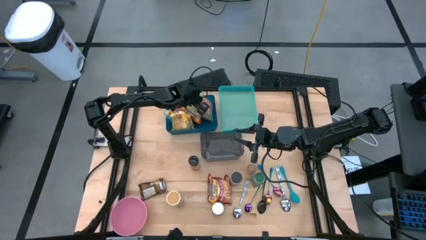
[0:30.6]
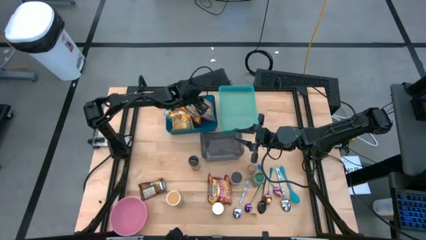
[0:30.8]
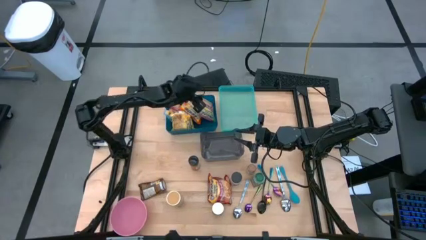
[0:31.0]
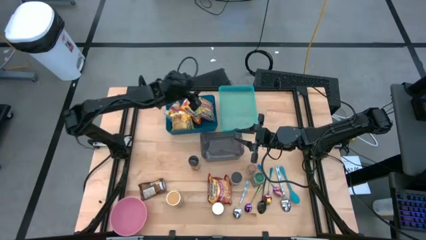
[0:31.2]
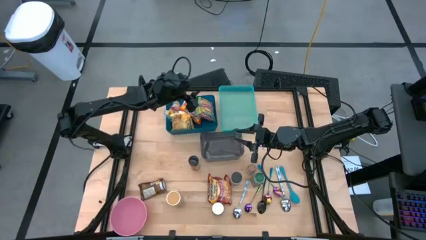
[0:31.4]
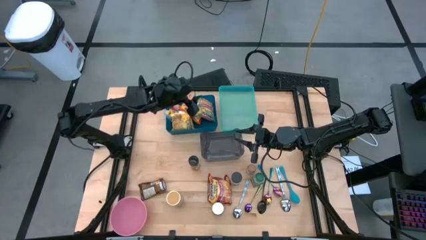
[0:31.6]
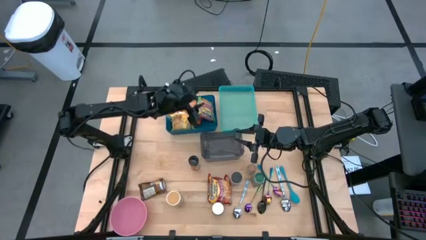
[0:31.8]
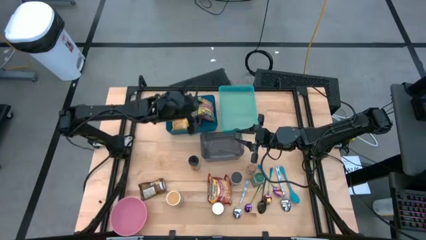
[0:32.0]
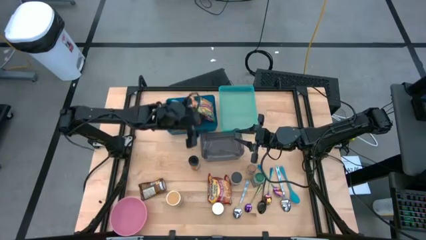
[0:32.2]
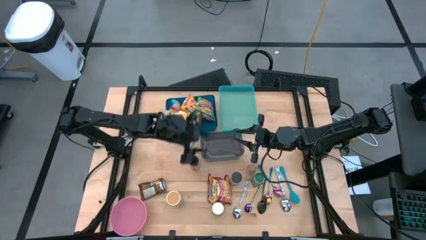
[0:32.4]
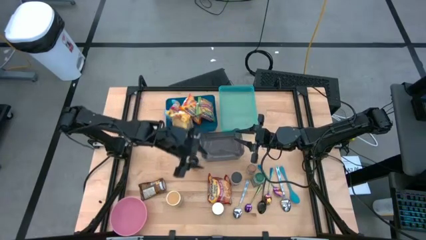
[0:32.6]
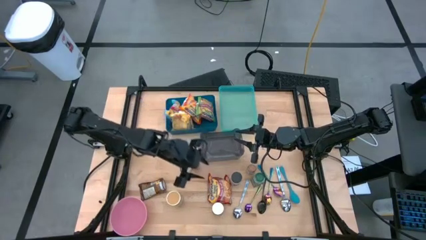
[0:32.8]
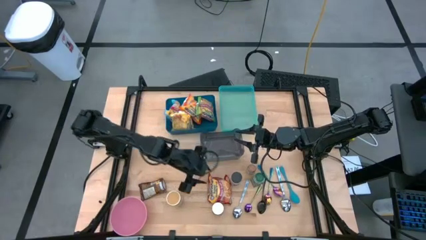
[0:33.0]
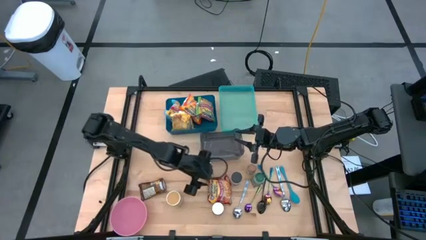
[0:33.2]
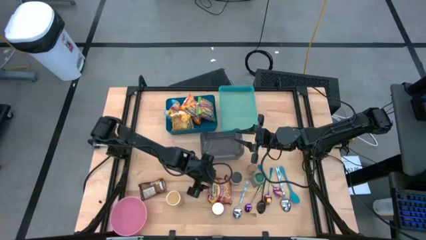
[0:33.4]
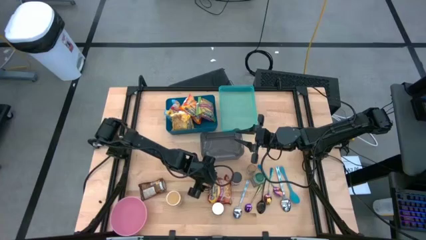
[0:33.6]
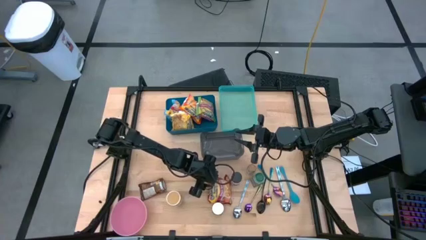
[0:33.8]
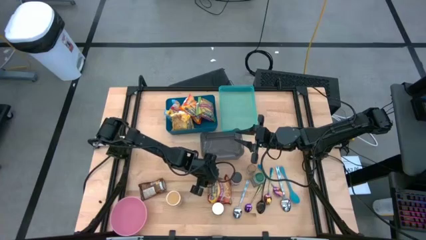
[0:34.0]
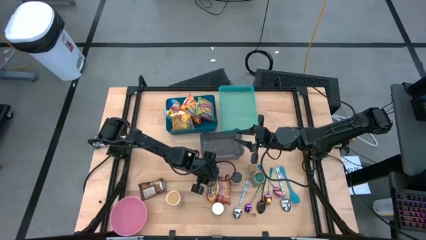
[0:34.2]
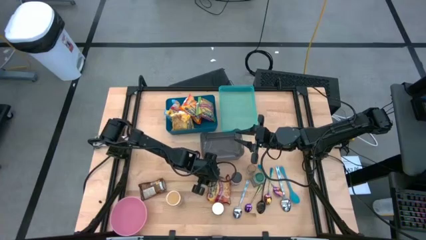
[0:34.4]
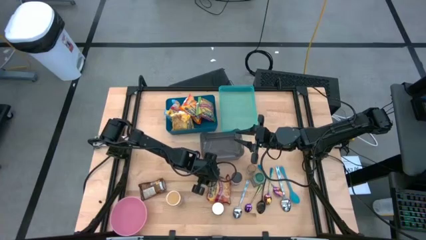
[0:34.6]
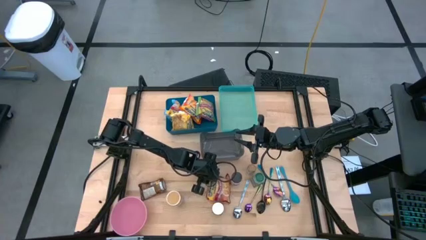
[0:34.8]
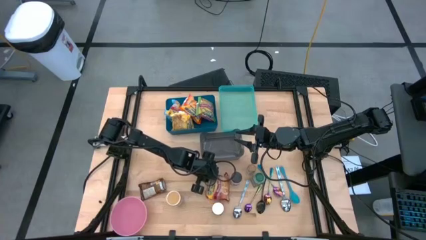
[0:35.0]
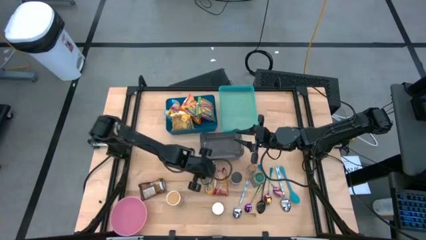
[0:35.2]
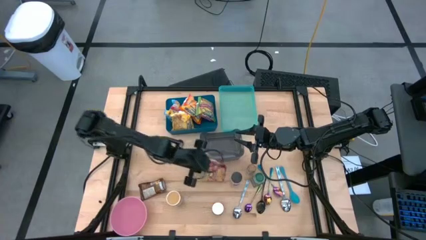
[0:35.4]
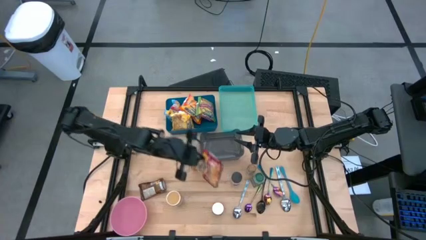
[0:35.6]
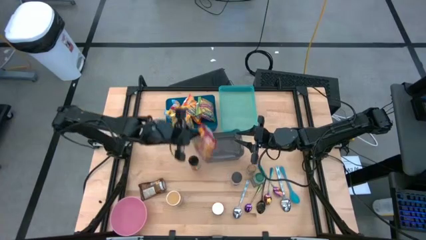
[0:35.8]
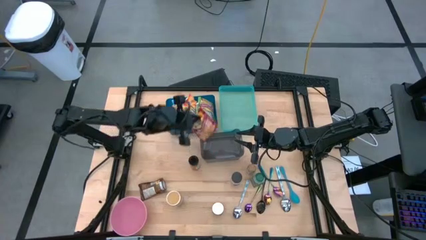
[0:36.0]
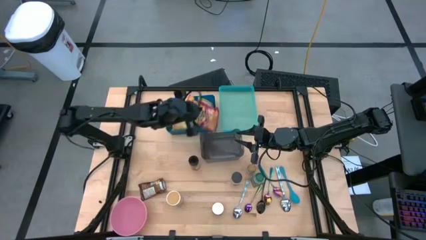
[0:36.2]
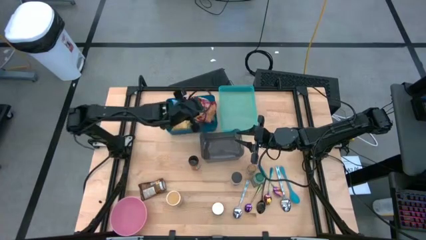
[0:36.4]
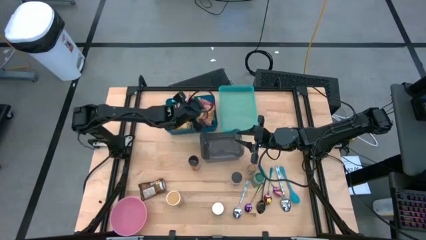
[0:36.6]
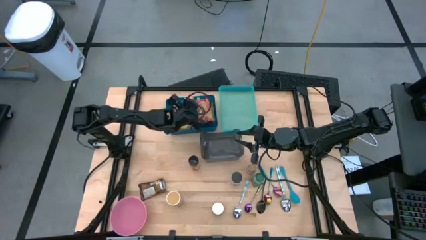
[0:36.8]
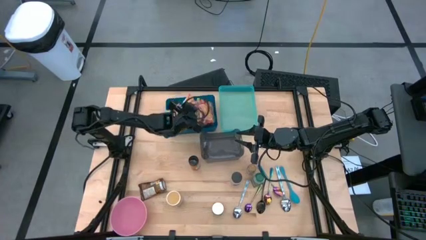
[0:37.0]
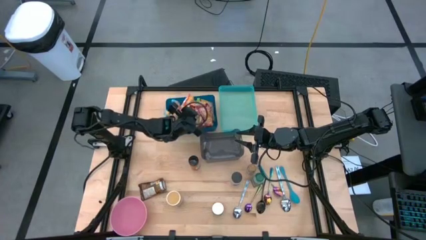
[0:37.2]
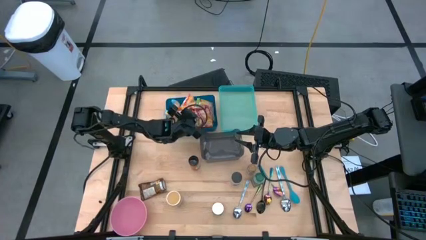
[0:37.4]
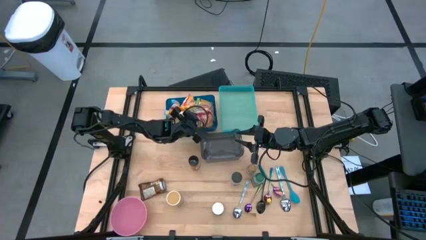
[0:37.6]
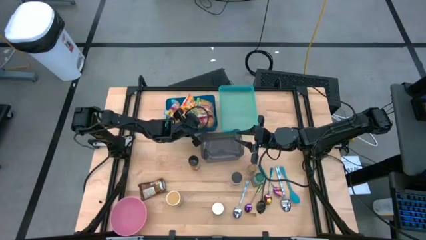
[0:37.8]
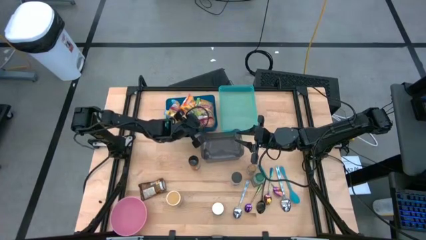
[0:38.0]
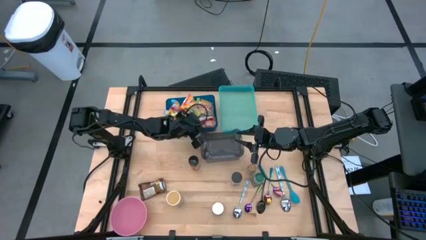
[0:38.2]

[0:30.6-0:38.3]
Task: Pick & Place Food Item
Put the red noodle pack into the blue bin

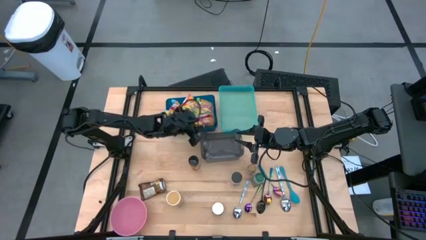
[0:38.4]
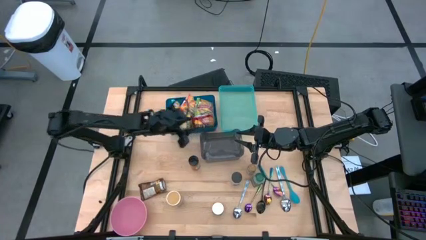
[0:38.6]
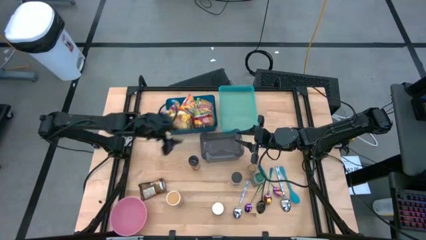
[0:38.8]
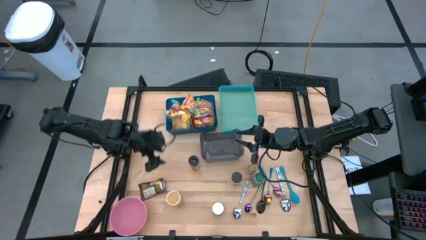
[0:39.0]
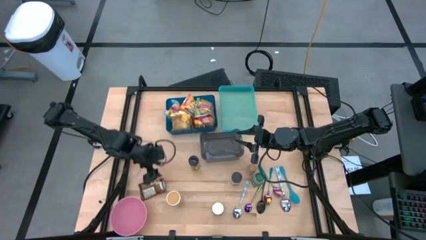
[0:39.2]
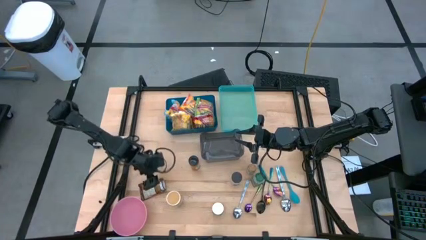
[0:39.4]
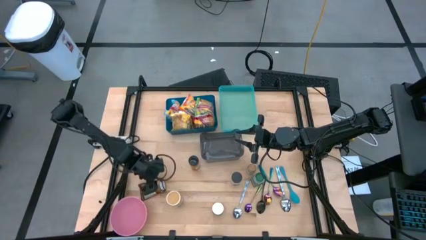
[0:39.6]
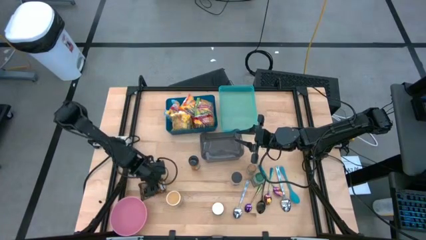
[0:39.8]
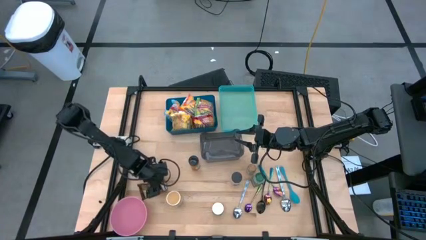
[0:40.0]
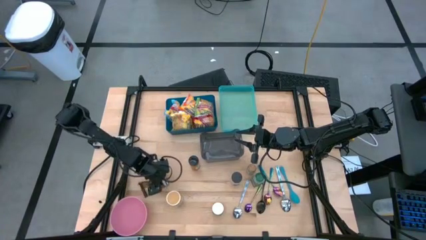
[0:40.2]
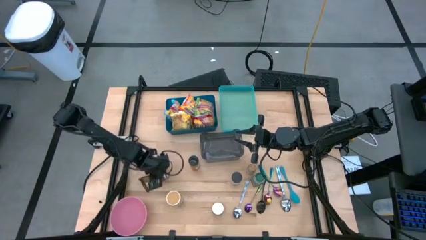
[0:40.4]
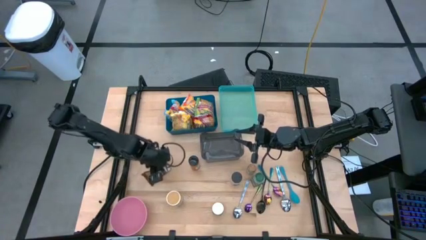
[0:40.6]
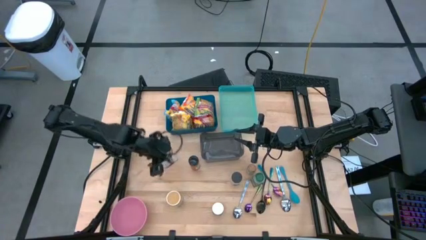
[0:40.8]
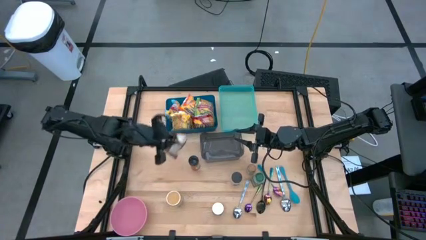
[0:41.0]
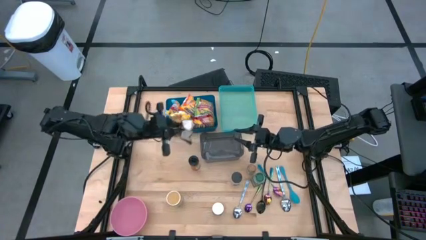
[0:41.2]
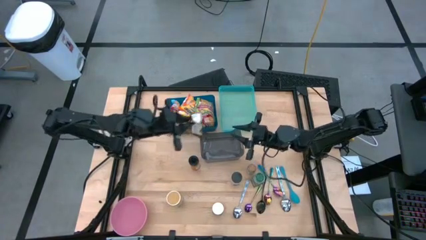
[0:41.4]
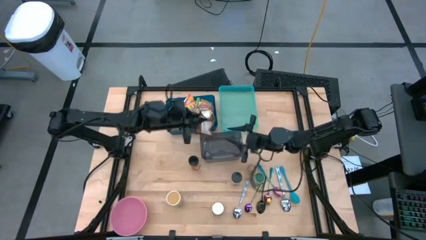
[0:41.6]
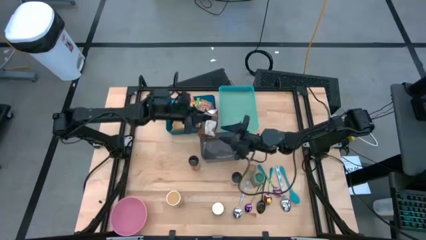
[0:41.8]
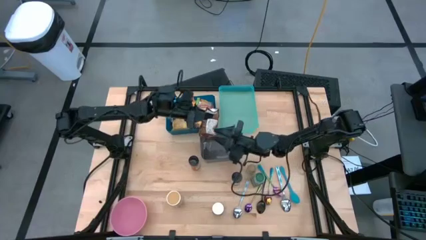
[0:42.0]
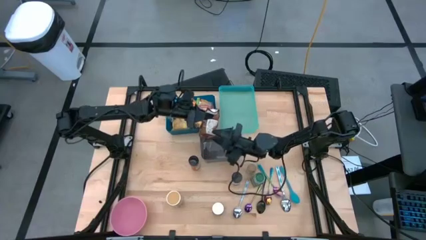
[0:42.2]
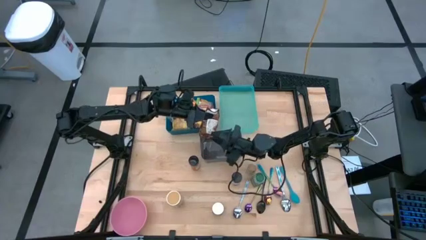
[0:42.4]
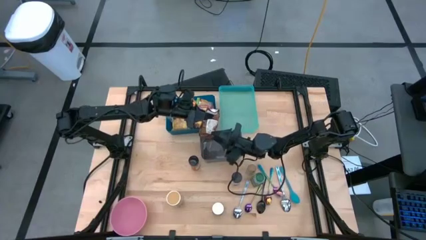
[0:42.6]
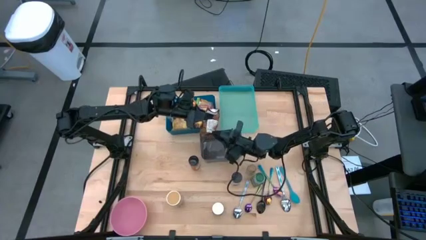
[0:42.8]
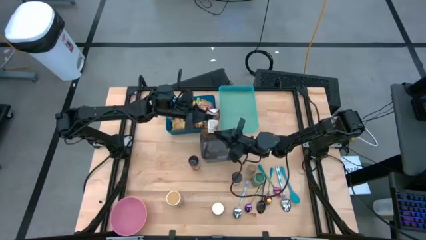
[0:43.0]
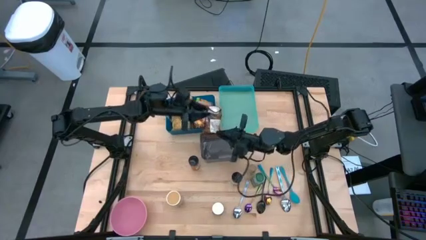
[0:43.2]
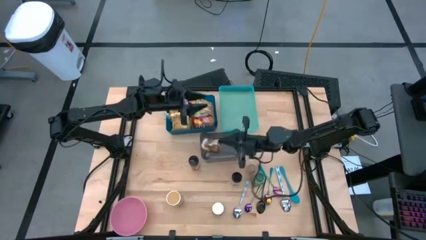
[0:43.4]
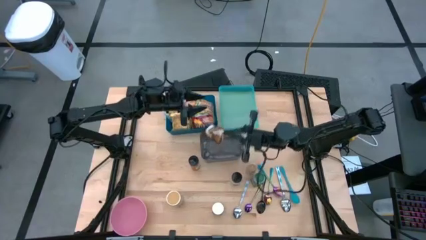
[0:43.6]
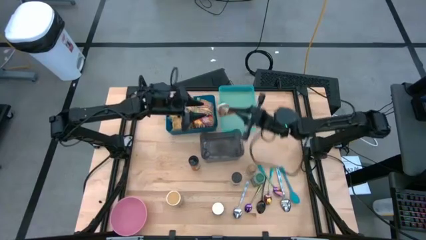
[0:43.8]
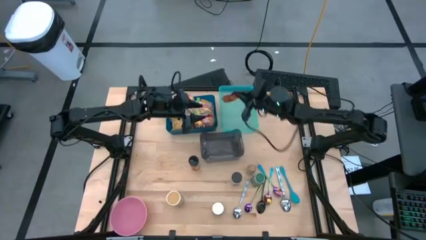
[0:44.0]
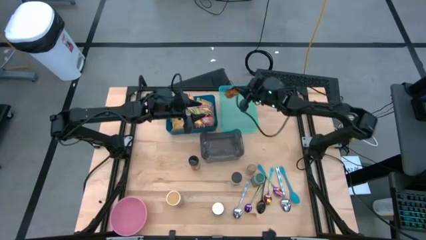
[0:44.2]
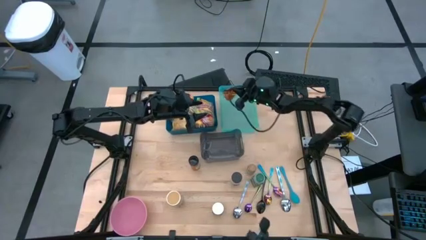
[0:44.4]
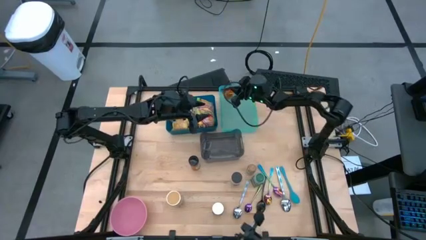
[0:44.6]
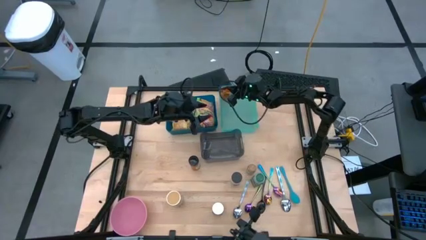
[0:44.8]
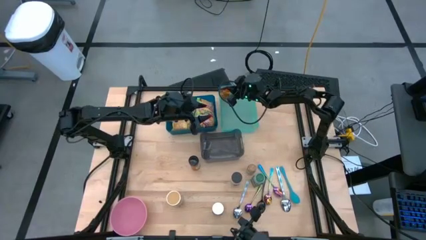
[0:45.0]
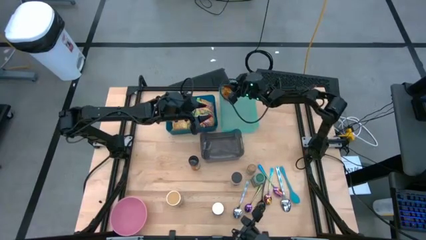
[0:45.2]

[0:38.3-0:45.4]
Put the orange seasoning bag into the green bin
